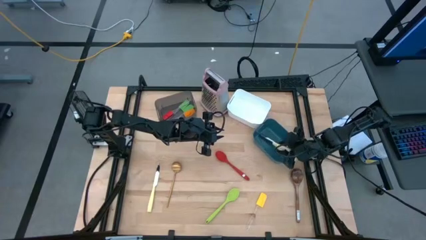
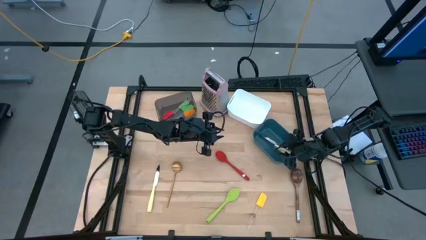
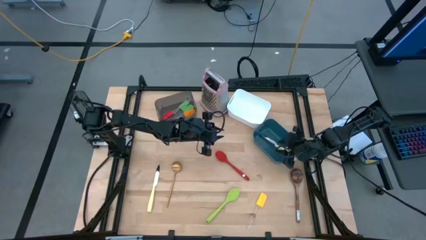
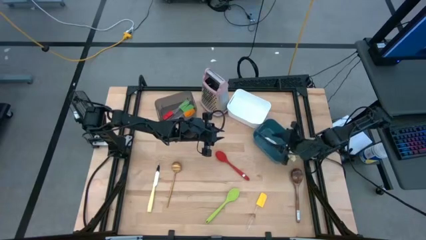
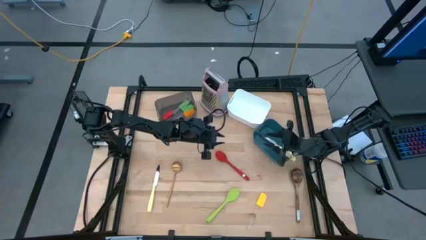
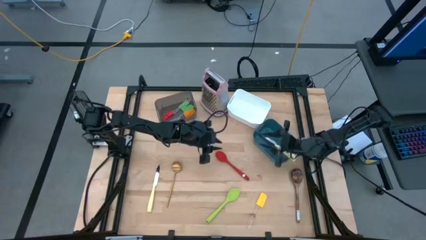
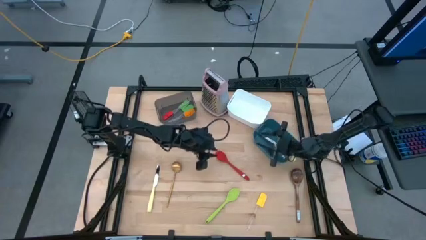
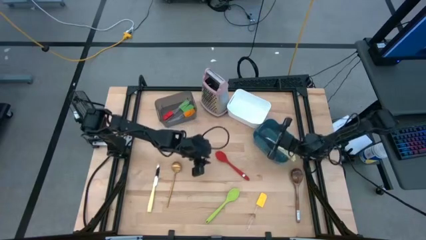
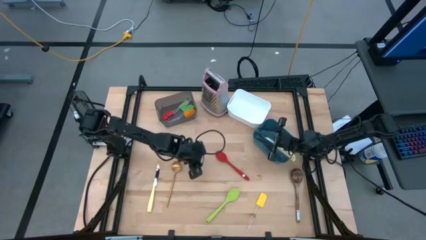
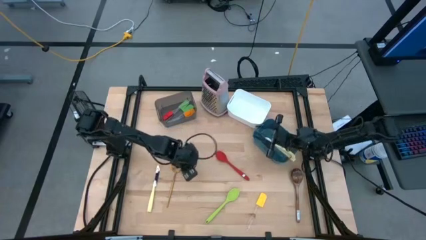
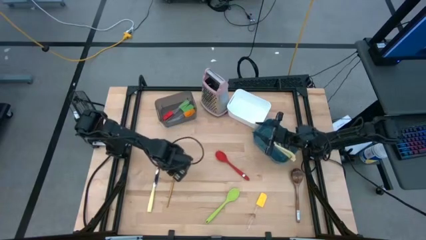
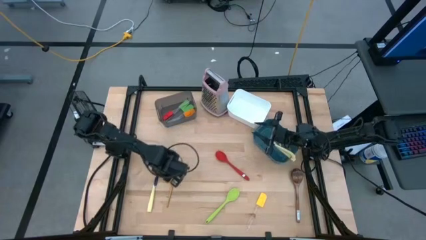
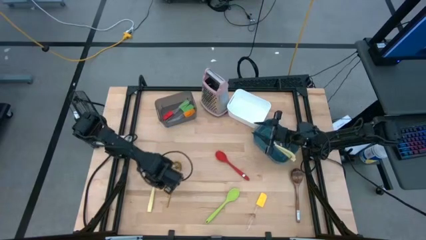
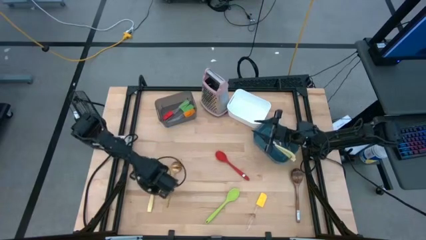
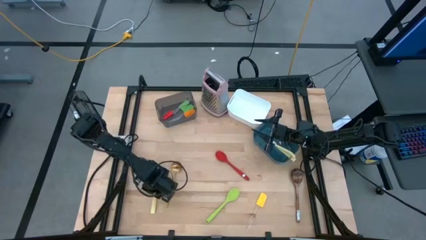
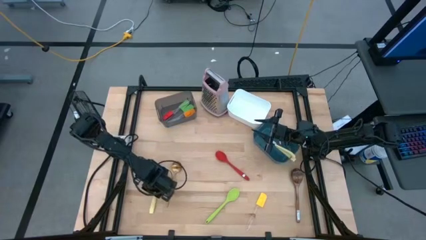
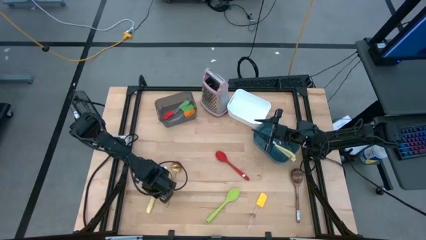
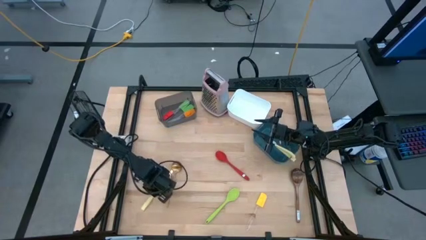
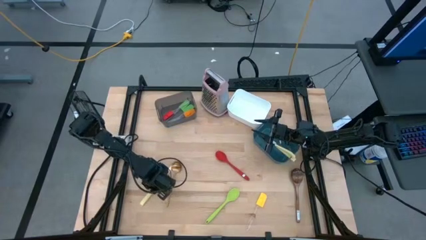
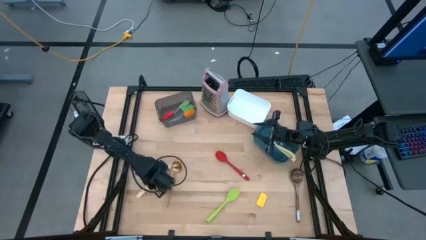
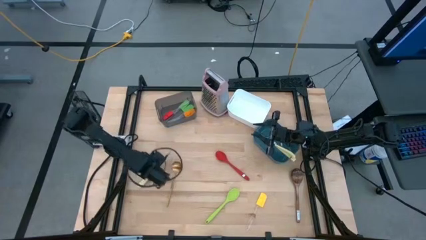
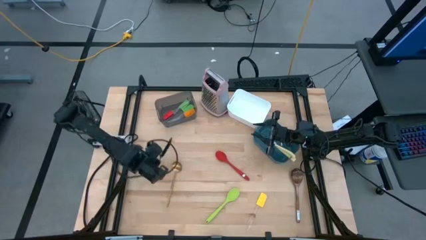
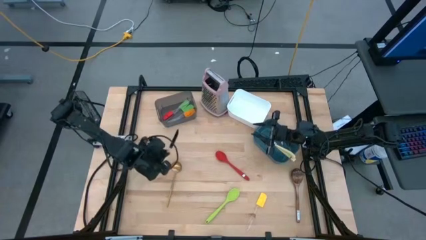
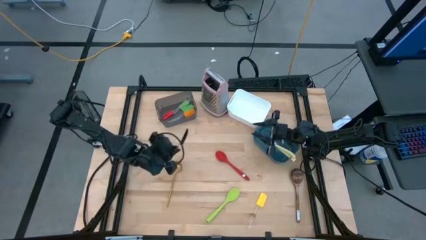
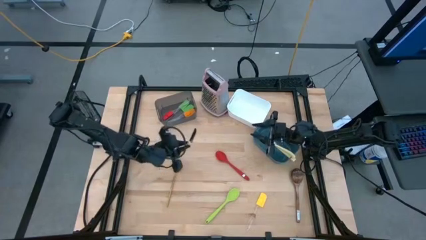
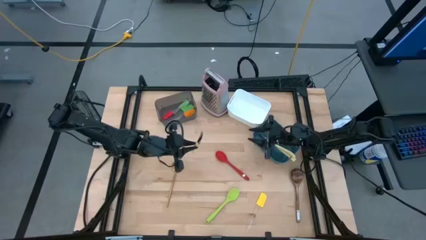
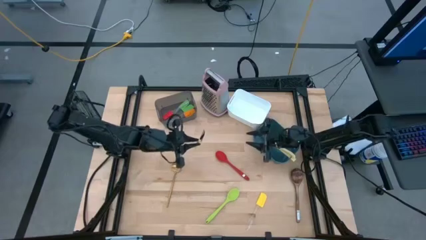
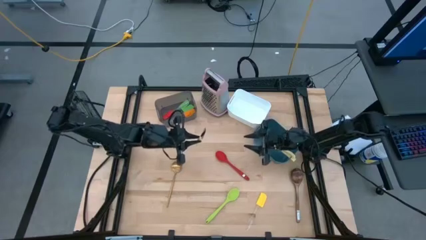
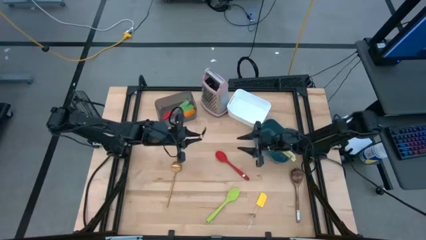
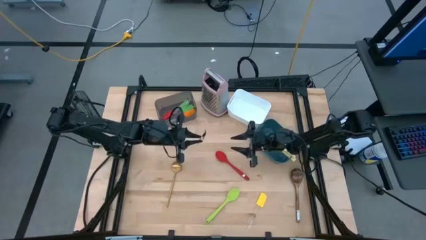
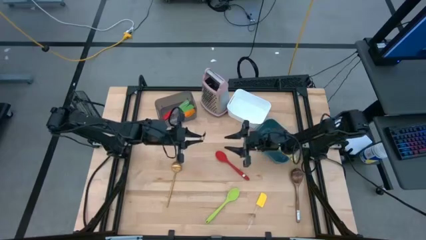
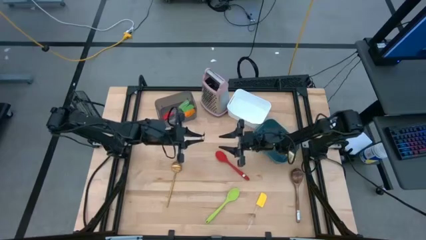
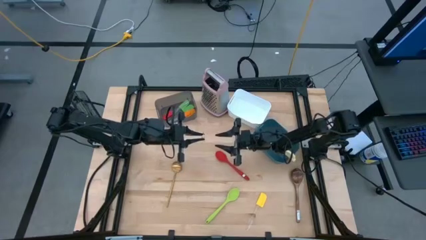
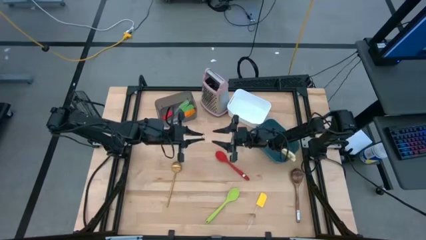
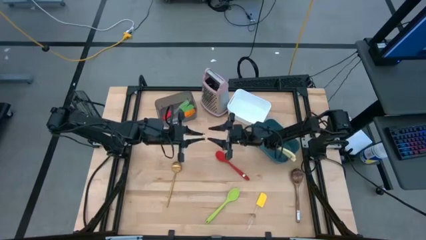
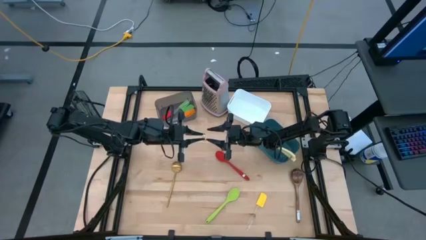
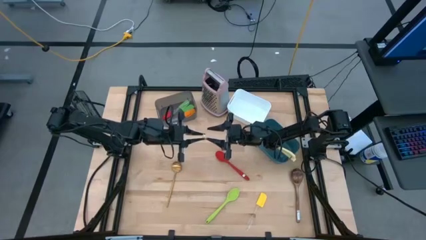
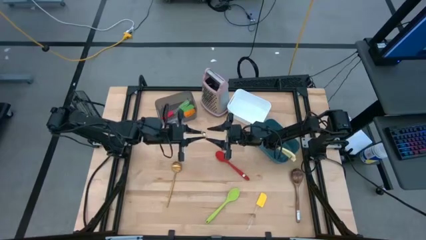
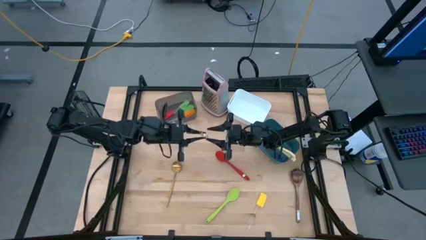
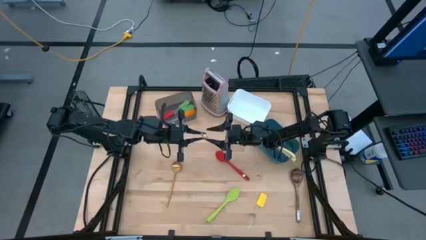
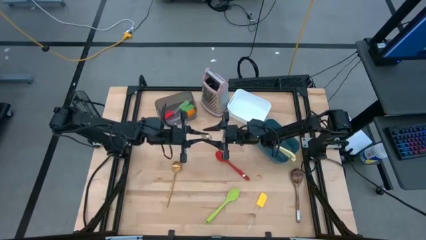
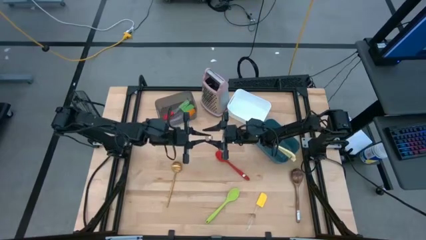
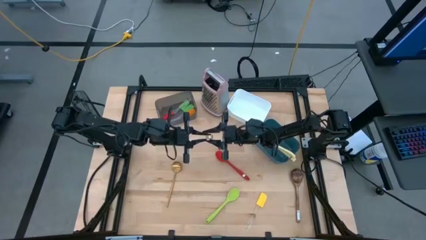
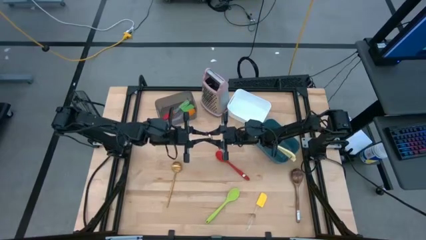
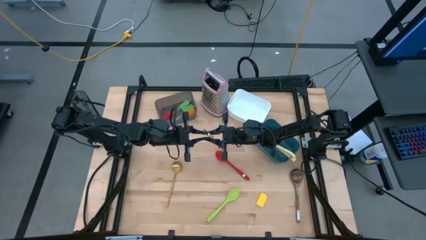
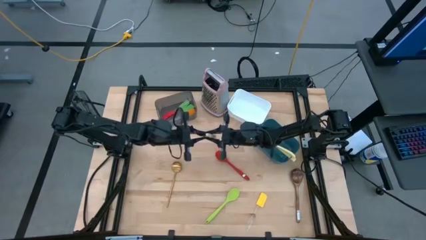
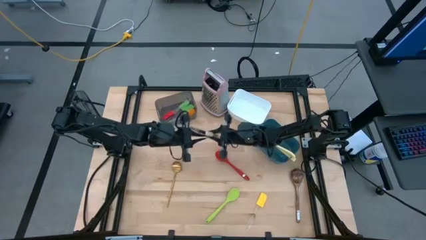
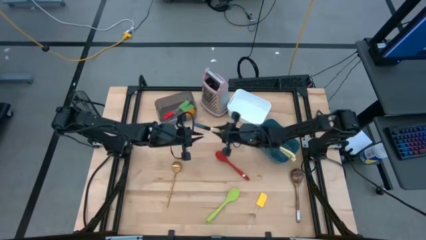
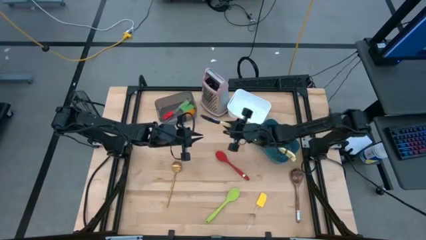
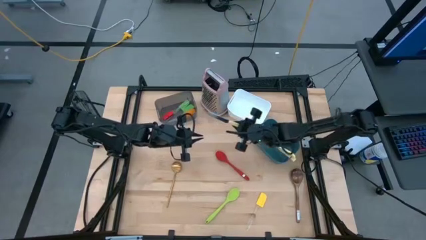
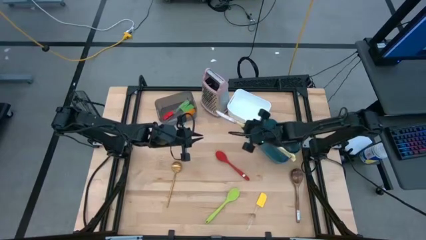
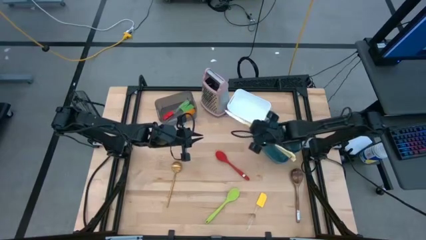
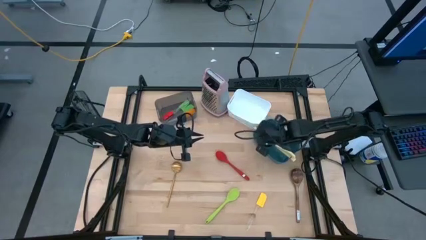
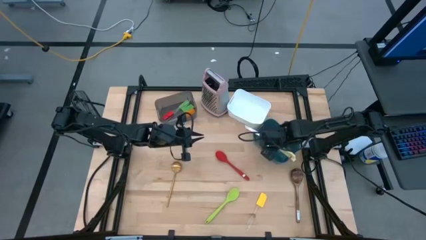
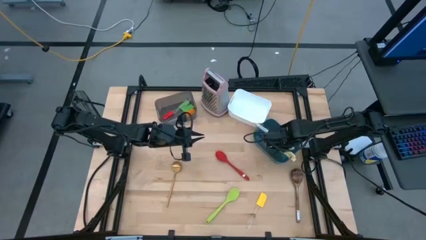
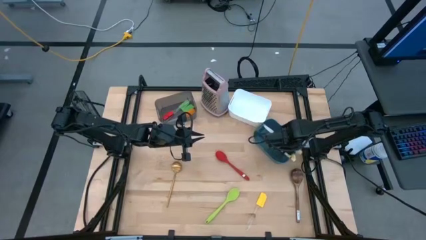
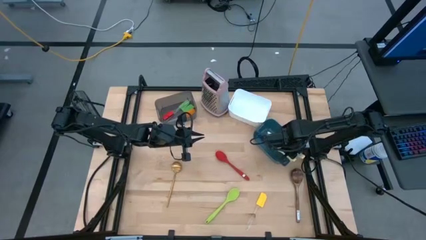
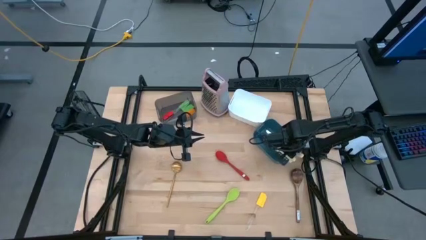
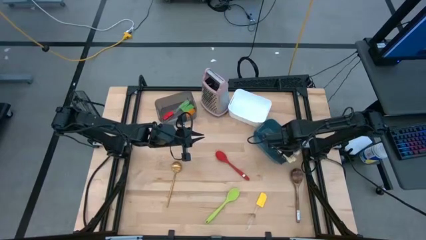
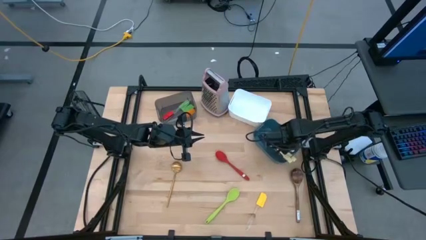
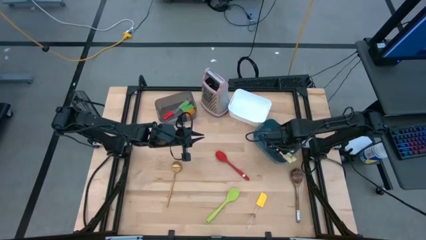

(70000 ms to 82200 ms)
Task: Pick & Place Kitchen Items
Put the yellow table knife into the blue bin

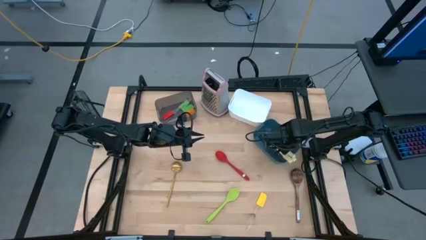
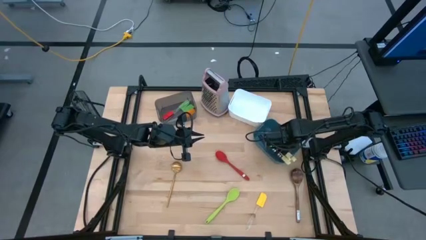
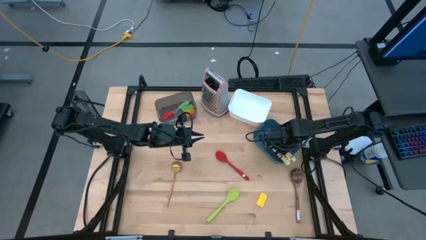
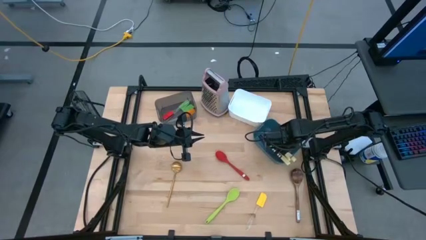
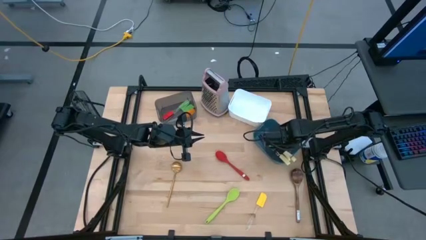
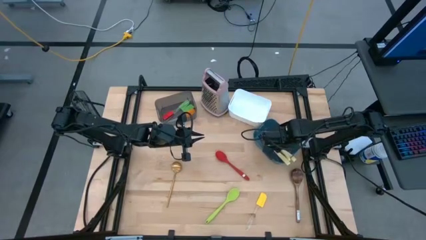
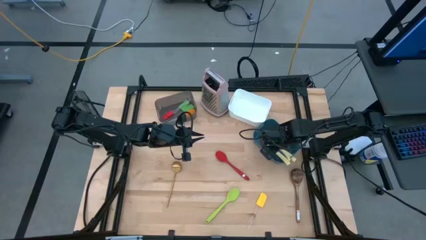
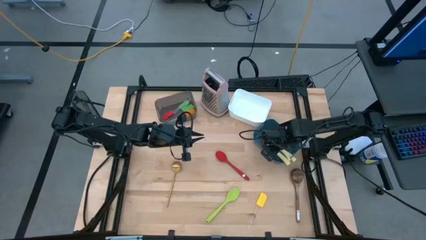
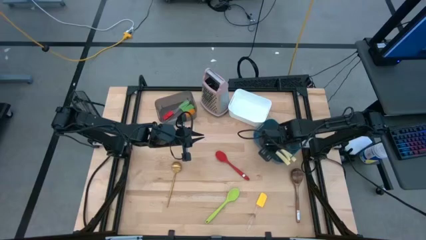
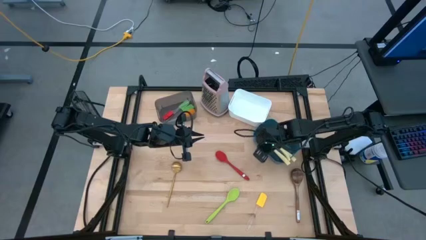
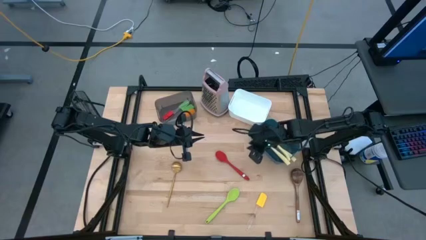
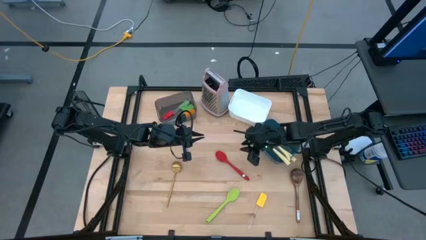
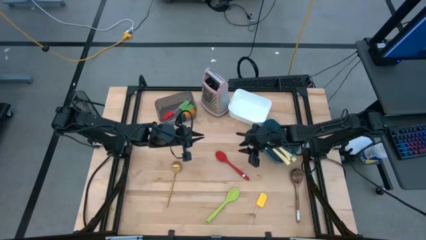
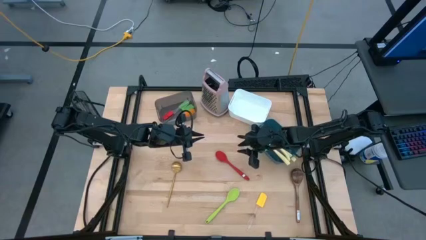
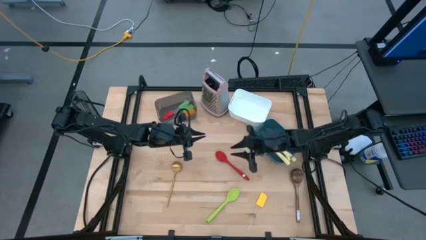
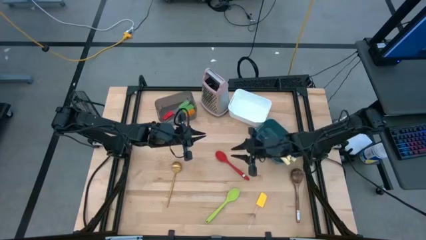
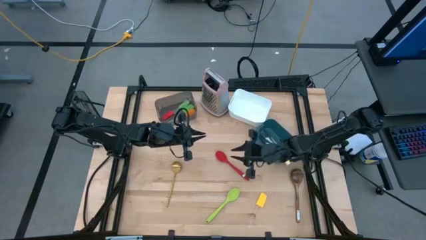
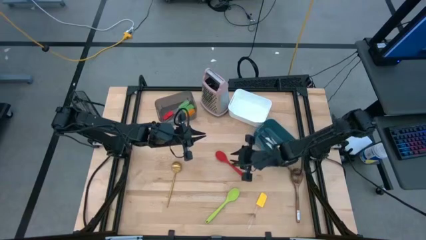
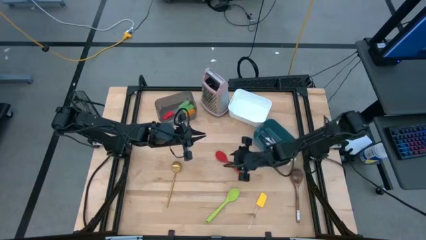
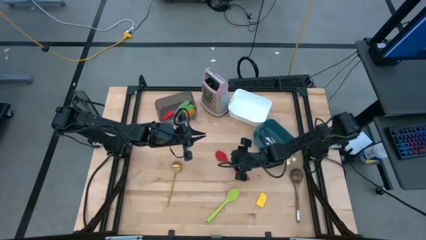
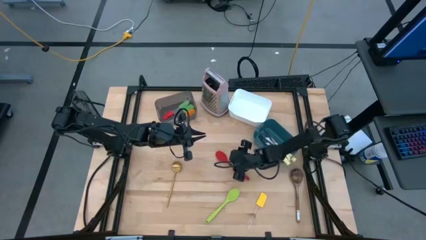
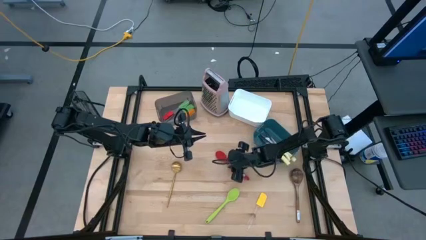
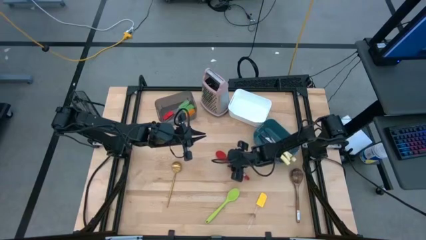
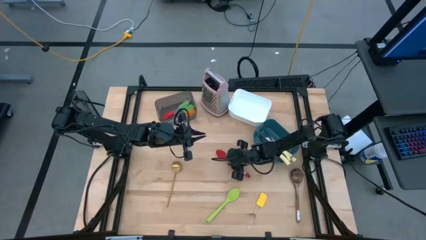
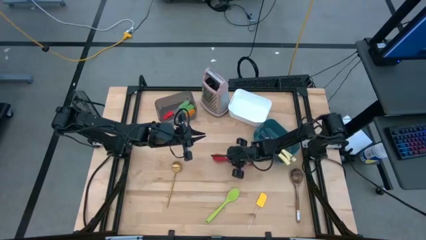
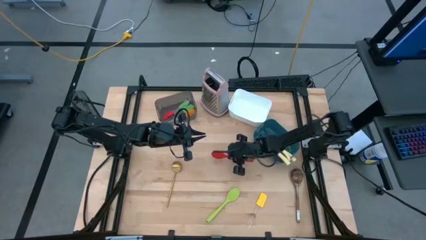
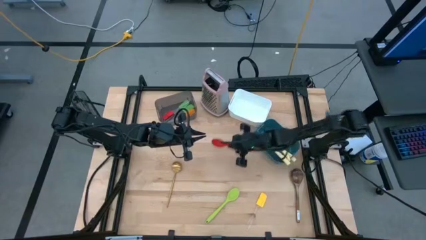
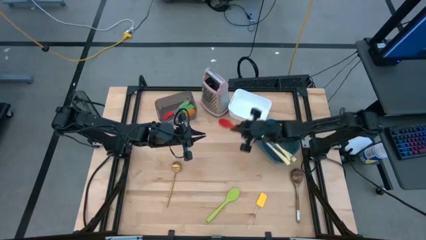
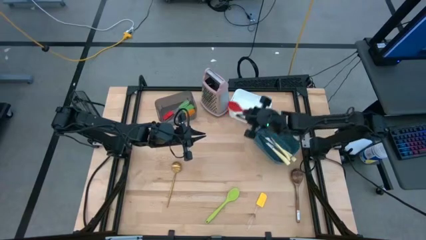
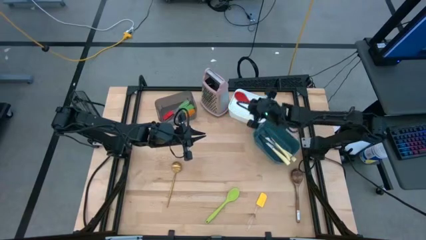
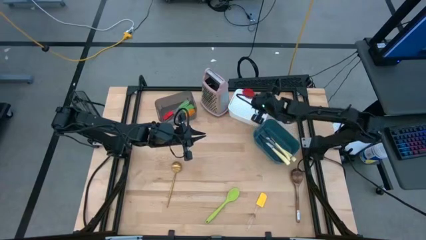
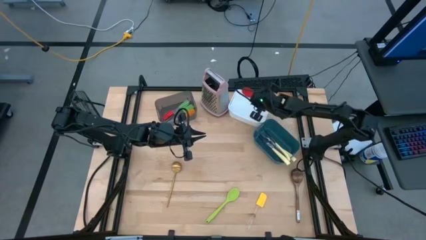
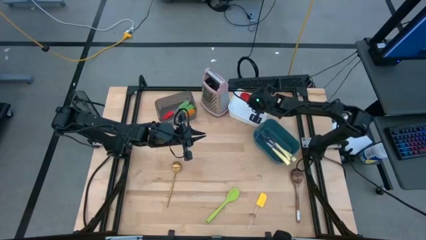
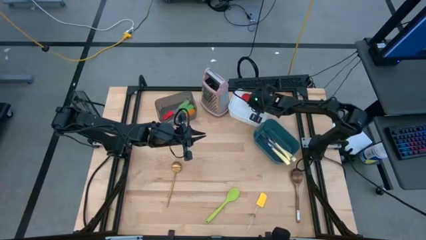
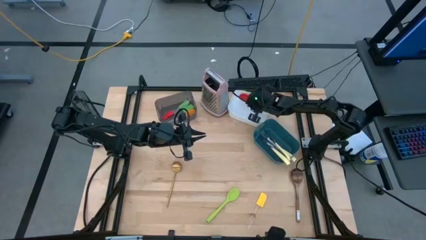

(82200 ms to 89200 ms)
Put the red serving spoon into the white bin
